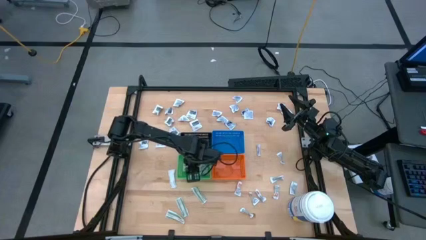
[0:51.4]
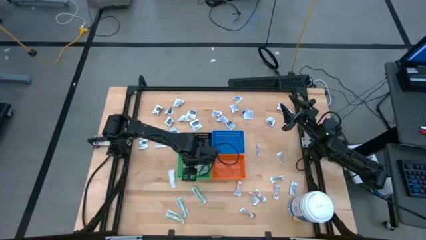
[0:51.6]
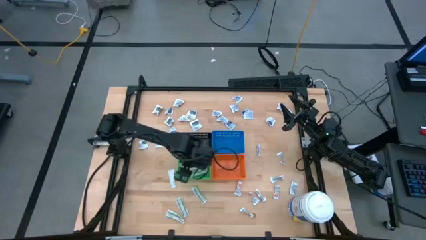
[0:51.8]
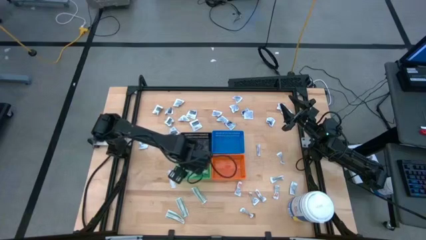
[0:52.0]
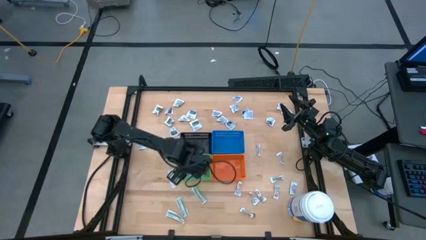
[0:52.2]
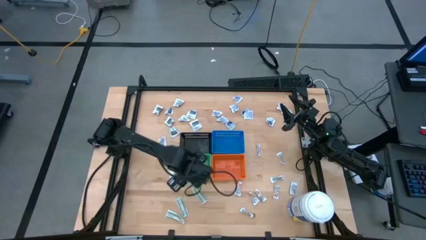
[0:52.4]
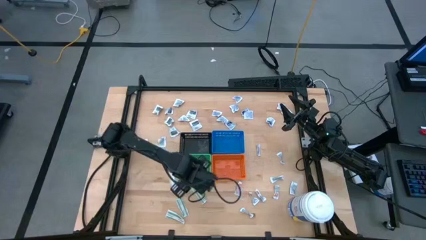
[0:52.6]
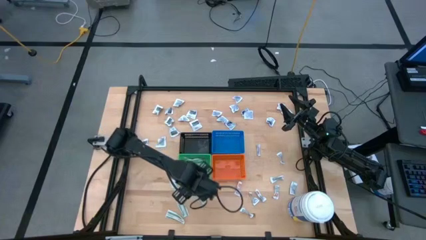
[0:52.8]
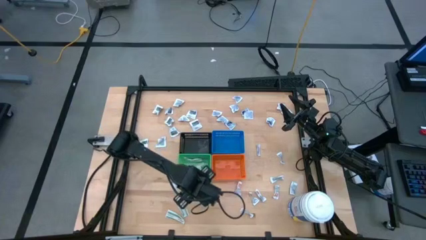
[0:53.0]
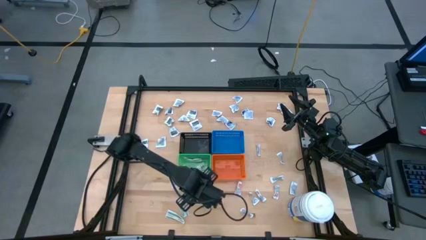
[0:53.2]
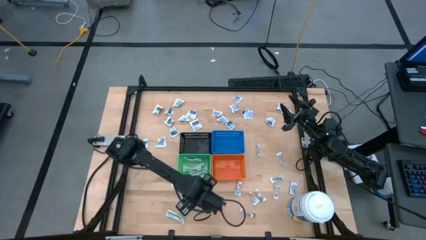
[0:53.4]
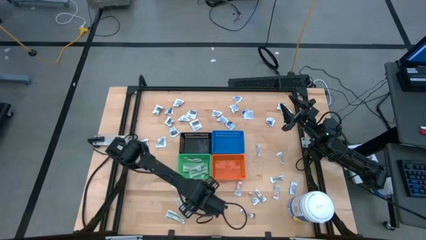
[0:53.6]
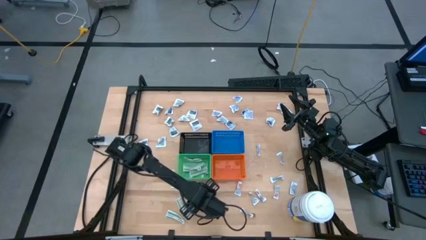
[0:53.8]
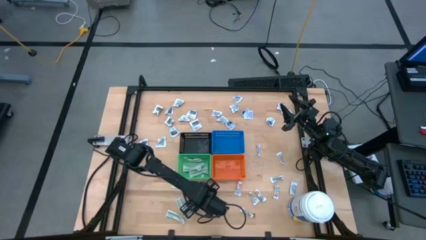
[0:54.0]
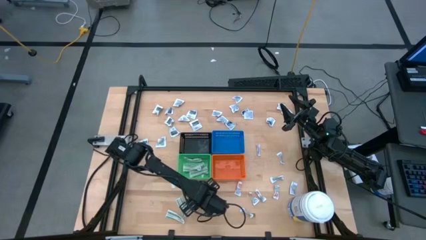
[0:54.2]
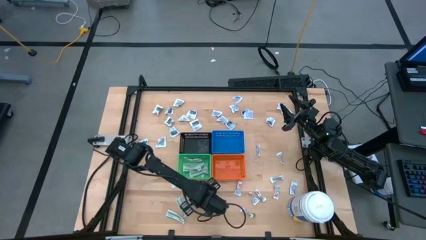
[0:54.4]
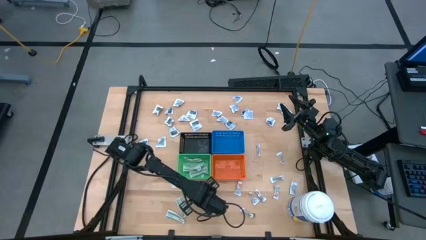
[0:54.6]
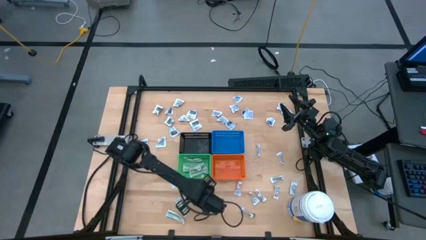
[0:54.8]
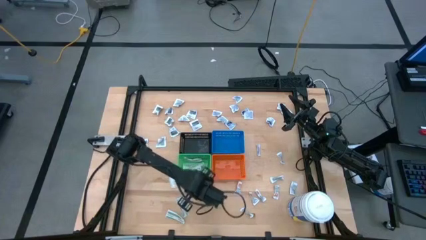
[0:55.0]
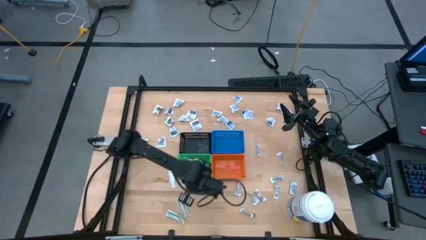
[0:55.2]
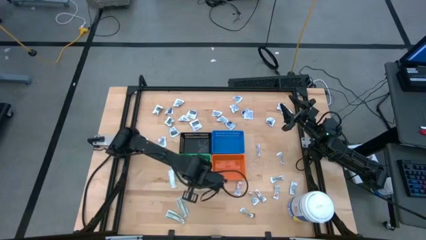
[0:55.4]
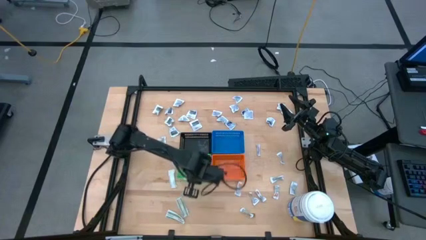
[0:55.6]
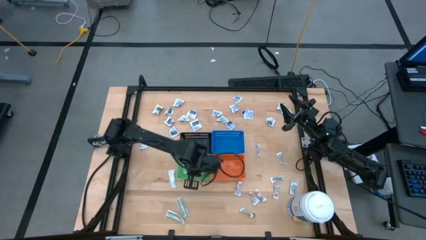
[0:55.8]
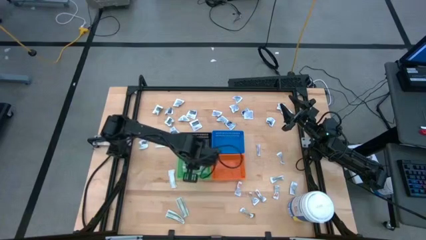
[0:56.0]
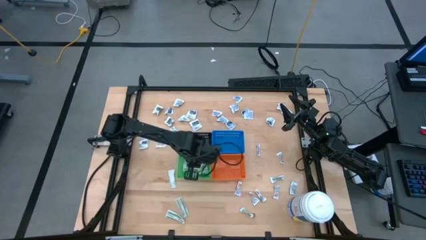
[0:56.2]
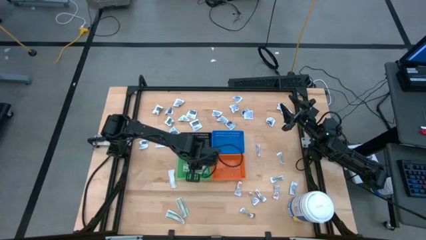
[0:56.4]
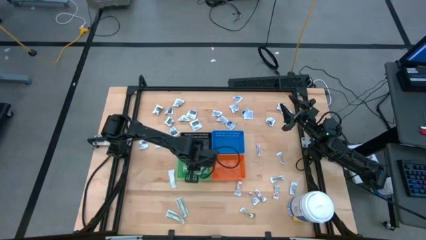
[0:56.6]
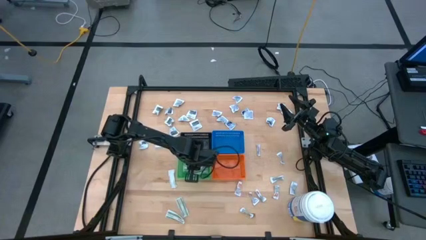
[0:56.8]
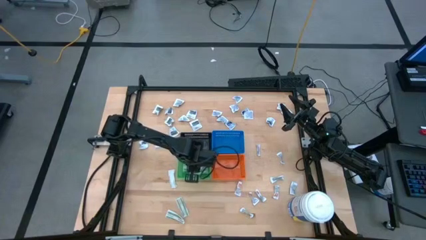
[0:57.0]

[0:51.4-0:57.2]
Task: Pick & Place First Aid Supplies
Put the bandage into the green bin

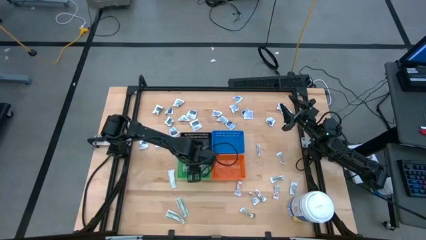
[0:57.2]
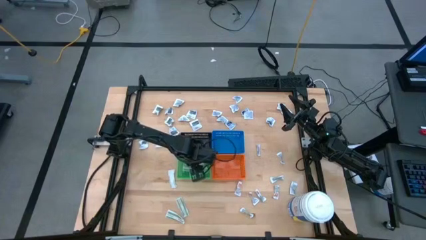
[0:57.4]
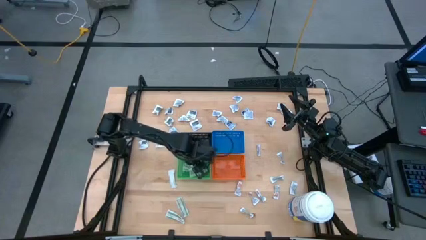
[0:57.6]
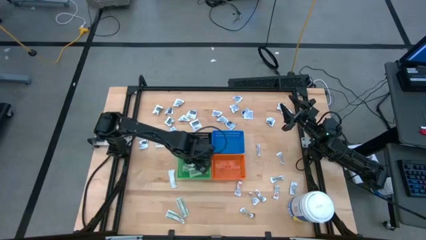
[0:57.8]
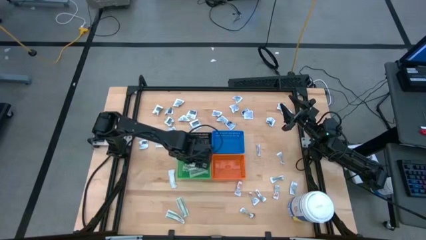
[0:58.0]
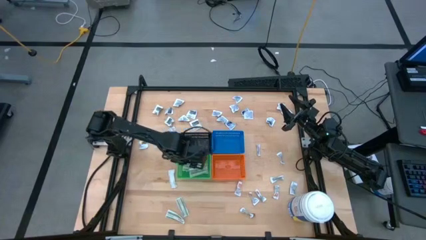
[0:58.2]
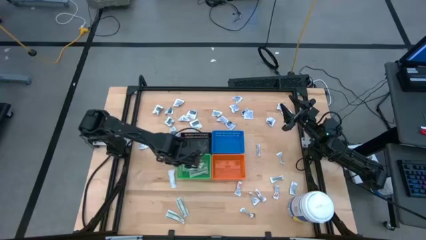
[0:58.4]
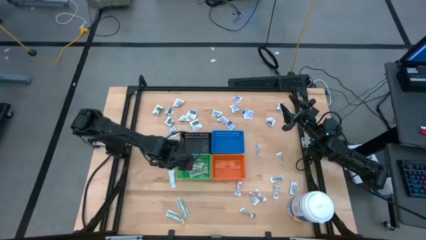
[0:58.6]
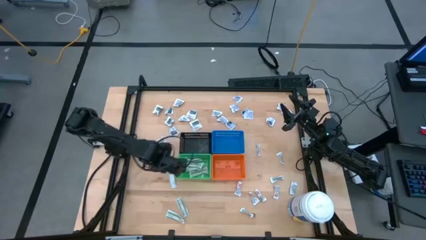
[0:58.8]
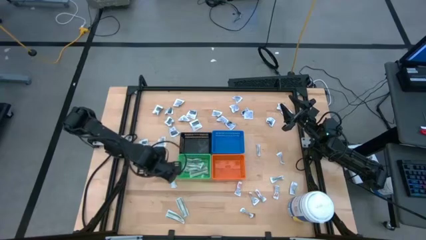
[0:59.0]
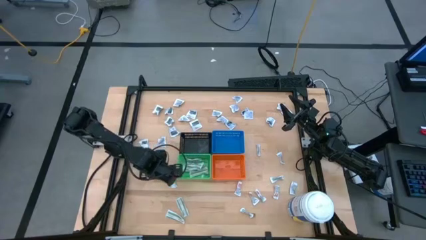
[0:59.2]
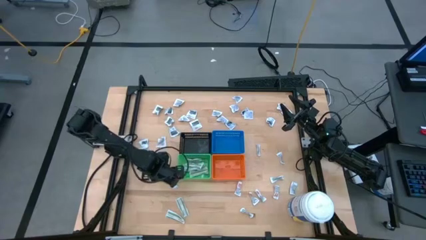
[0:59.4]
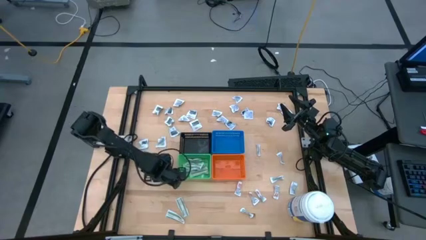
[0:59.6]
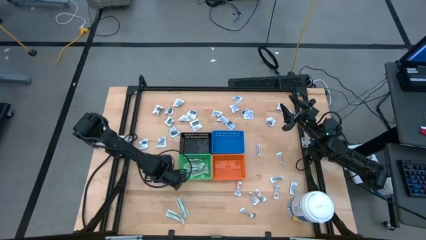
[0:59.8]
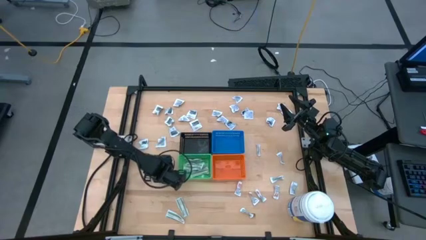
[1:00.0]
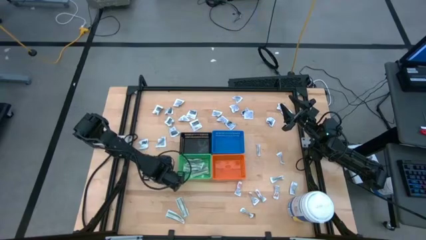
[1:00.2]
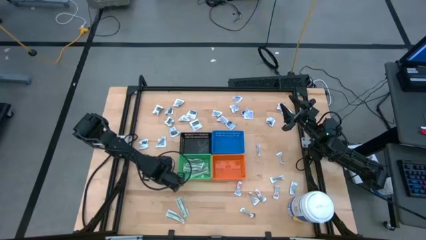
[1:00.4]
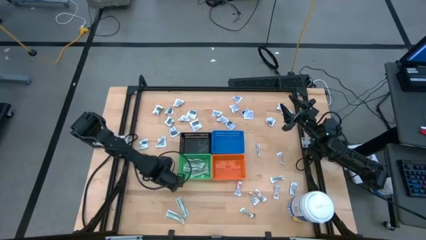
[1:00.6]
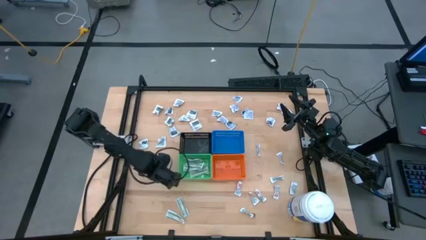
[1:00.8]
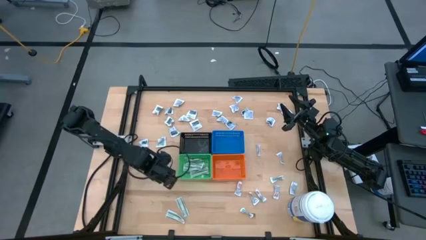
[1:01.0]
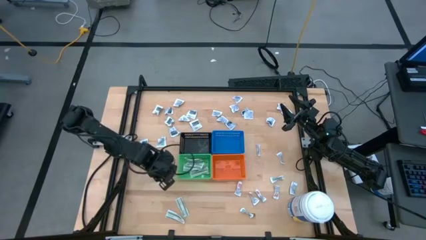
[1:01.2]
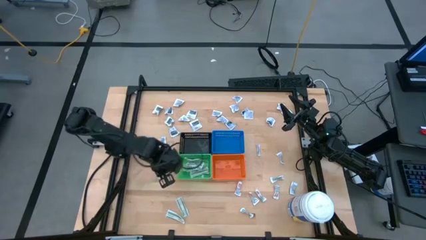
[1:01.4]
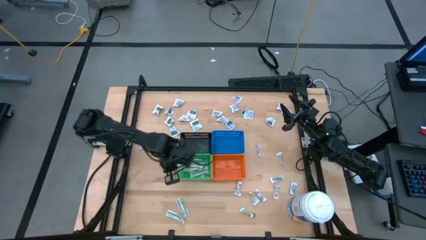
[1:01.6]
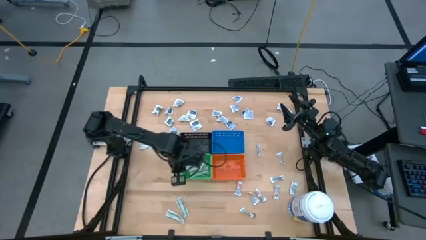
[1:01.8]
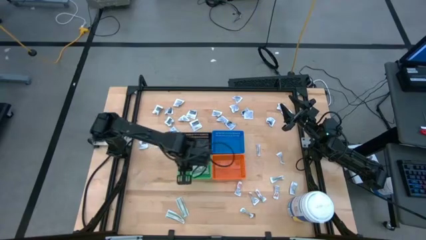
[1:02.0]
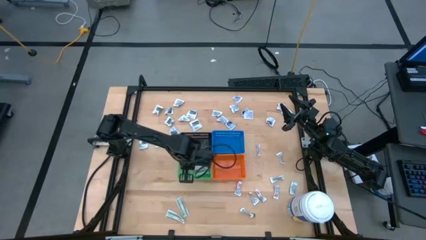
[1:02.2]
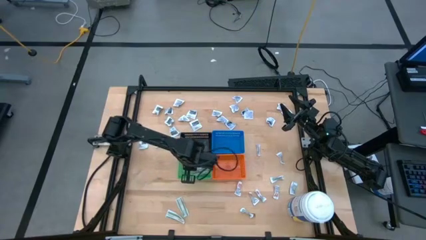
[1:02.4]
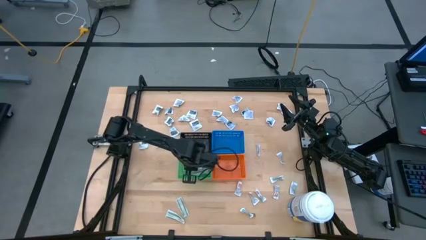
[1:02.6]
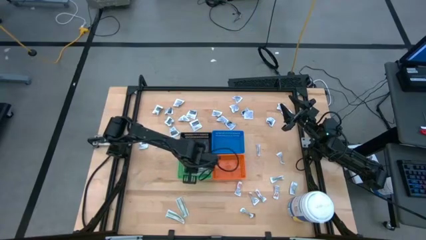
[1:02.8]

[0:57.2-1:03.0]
Put the bandage into the green bin

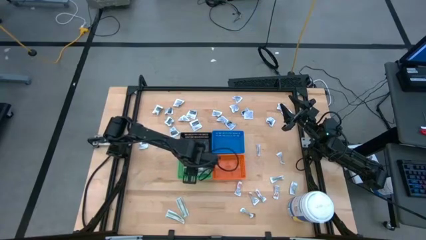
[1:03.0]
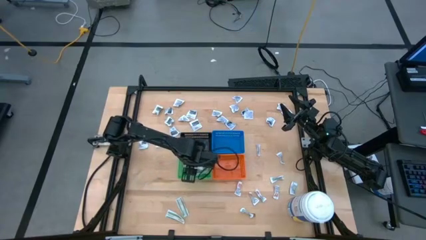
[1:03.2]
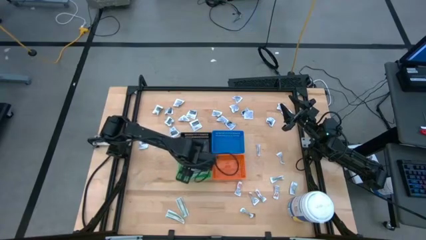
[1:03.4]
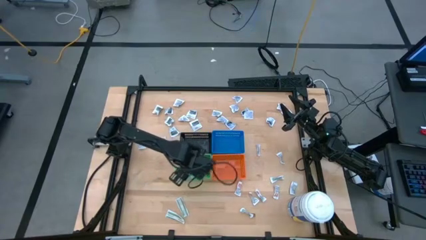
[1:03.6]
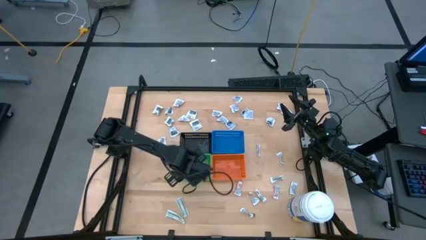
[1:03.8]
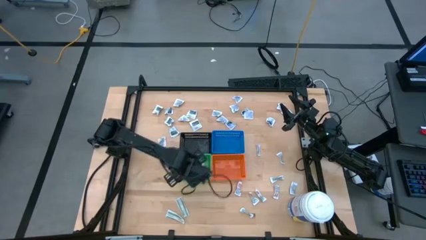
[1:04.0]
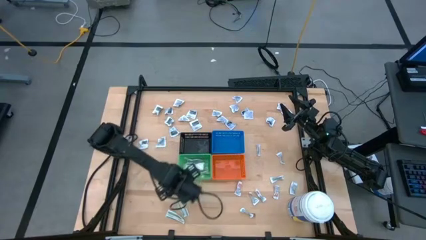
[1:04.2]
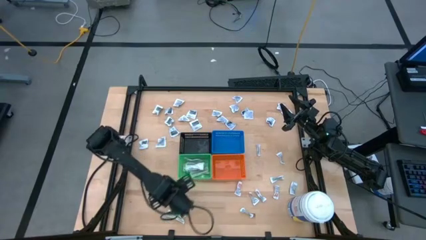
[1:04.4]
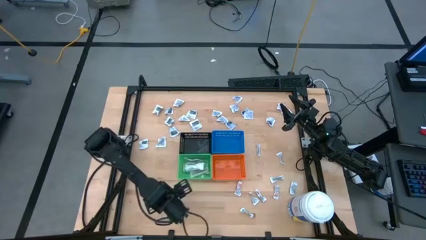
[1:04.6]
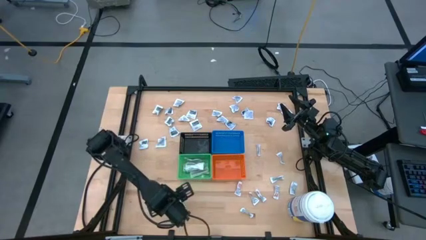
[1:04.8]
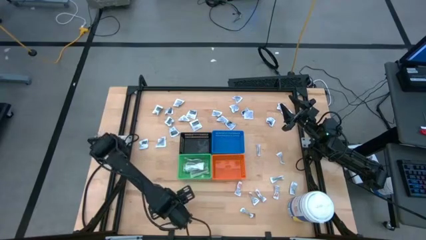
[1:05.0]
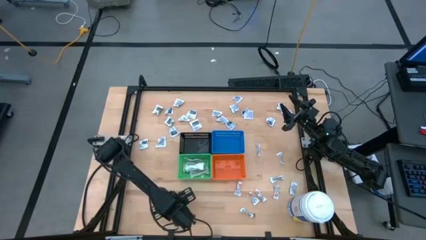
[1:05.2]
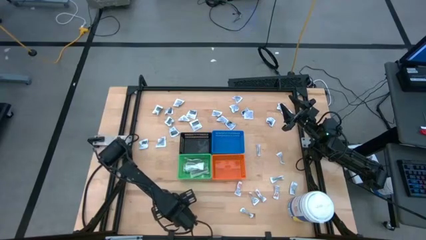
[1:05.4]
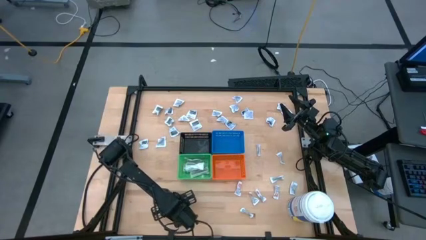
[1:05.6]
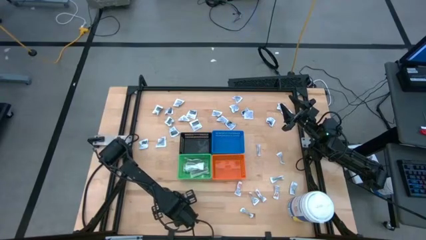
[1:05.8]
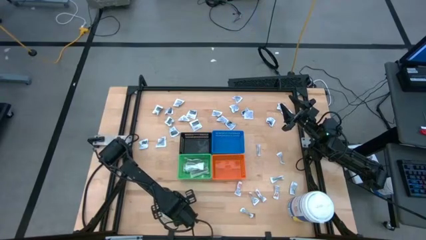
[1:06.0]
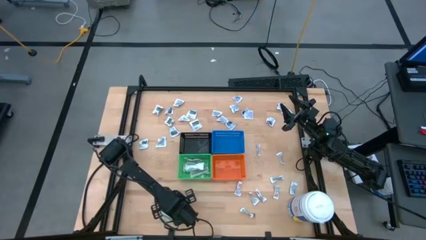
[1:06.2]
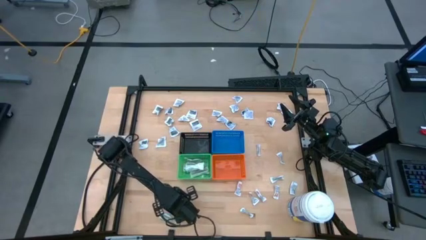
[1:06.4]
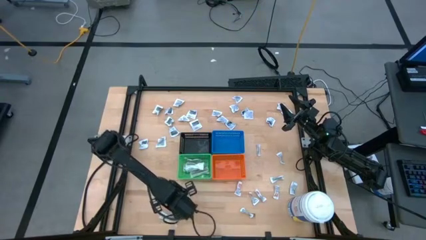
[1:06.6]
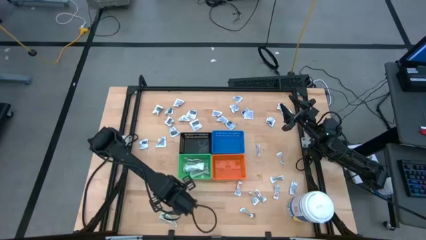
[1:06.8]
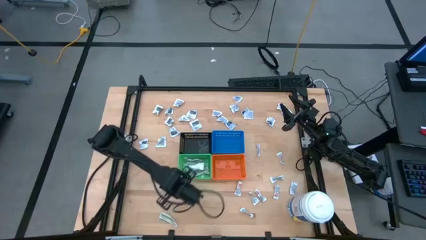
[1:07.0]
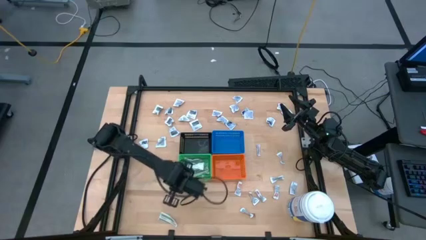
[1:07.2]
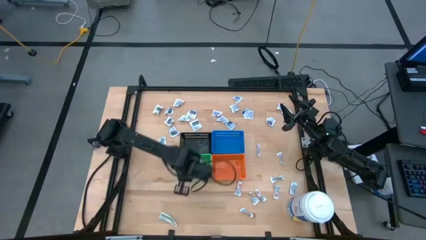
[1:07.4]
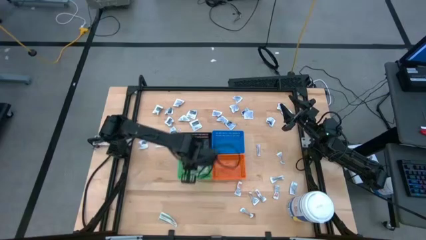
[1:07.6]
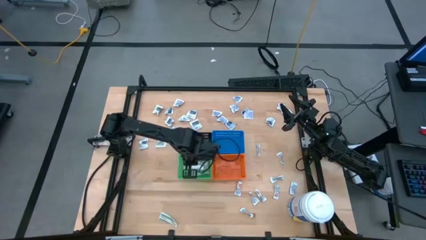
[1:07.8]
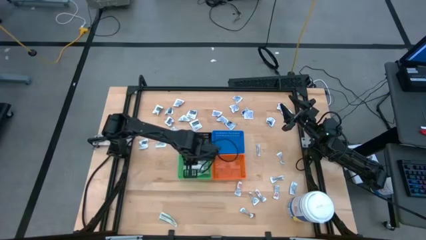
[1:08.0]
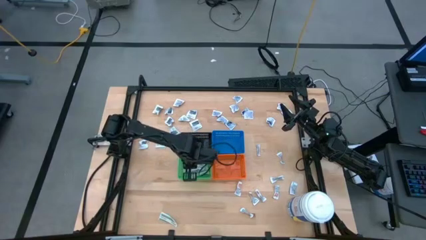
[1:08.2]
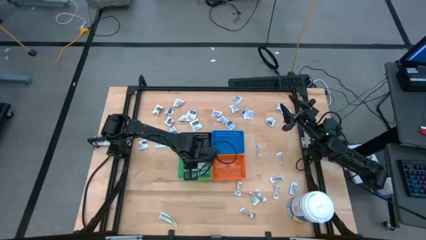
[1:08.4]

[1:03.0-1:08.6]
Put the bandage into the green bin
